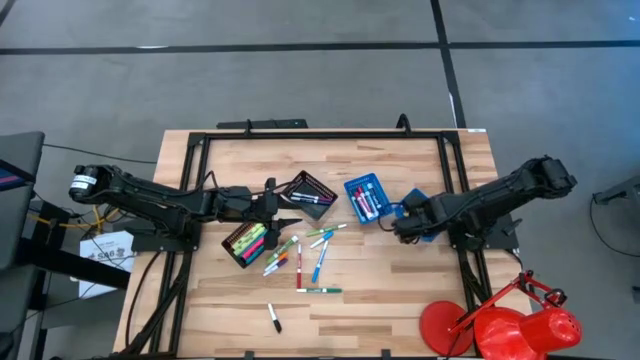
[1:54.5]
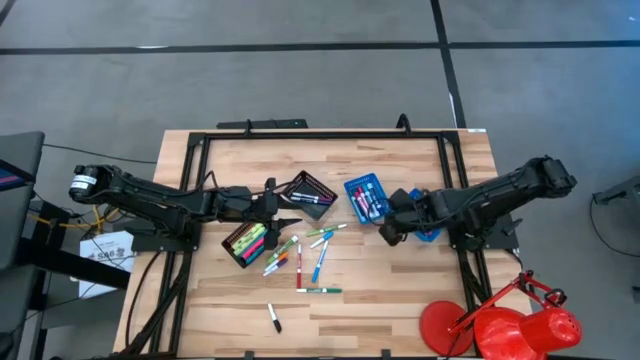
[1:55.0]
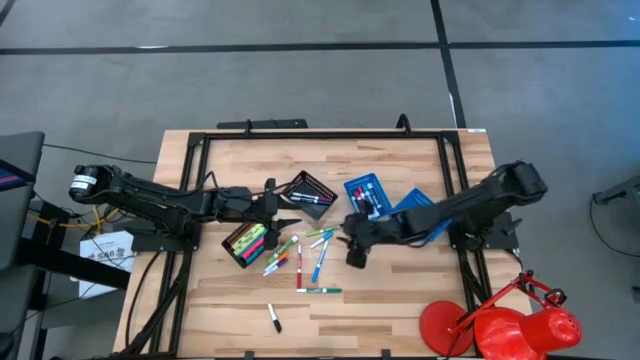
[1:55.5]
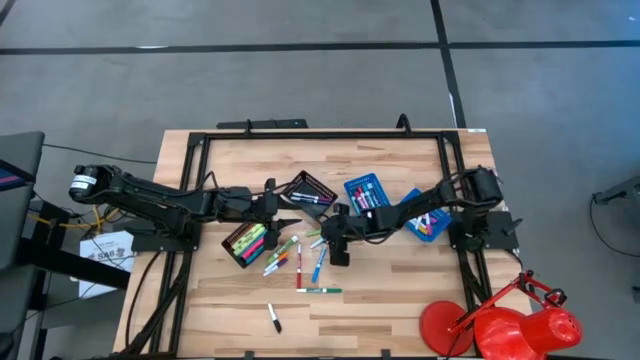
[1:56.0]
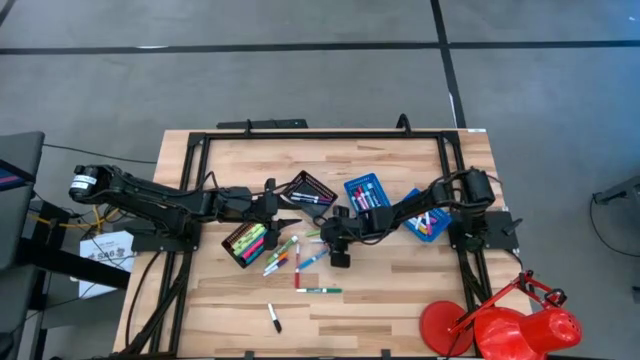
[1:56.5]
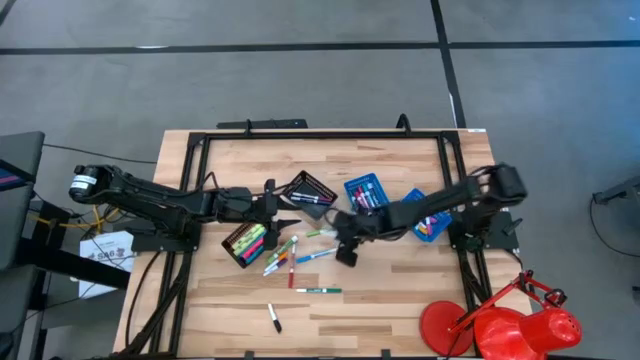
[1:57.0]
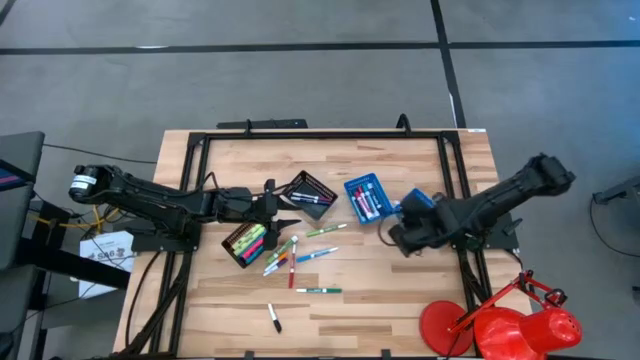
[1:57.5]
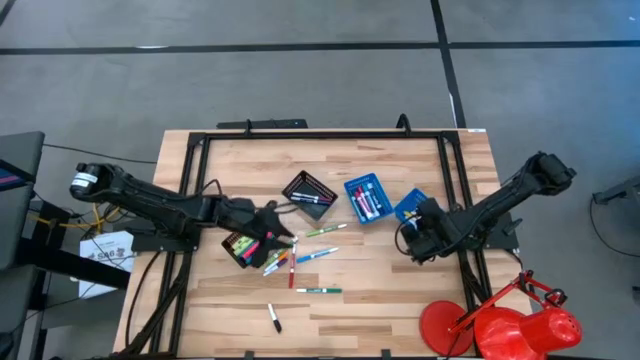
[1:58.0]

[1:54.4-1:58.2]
Task: Pick & Place Markers
Put the blue highlighter into the right blue bin

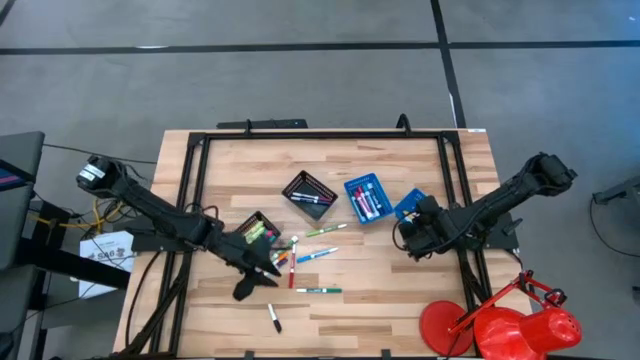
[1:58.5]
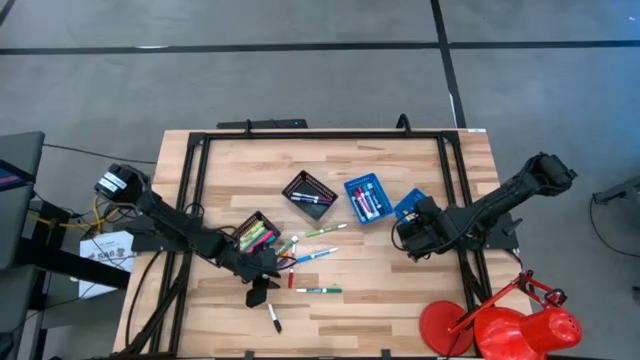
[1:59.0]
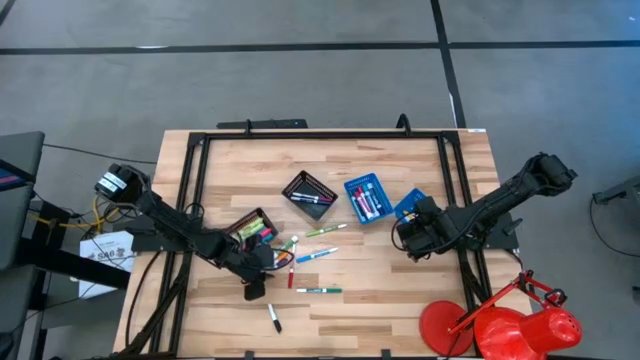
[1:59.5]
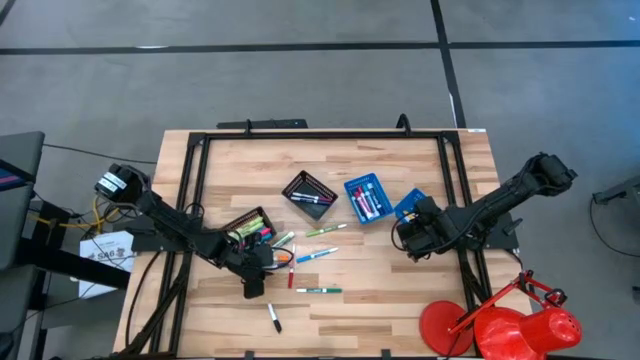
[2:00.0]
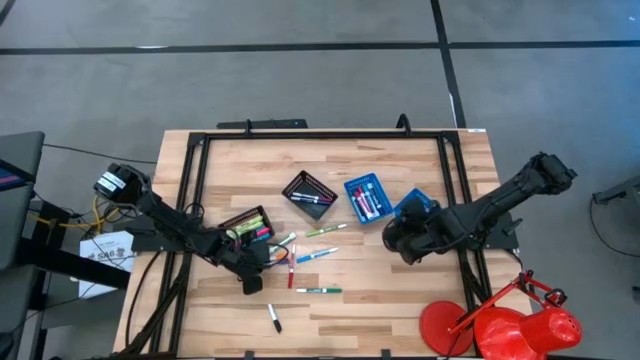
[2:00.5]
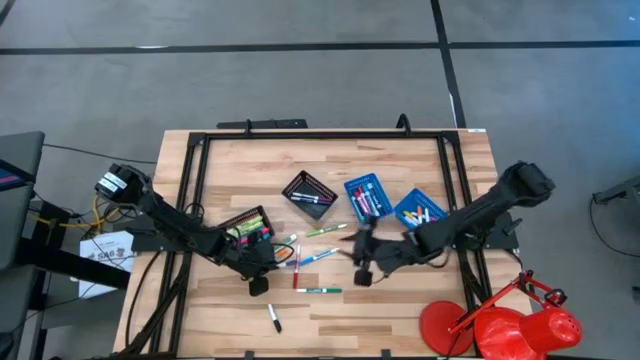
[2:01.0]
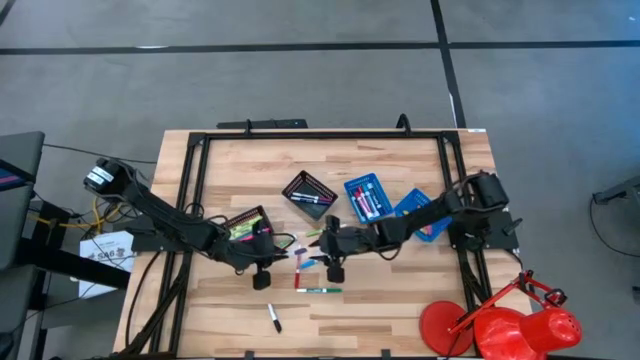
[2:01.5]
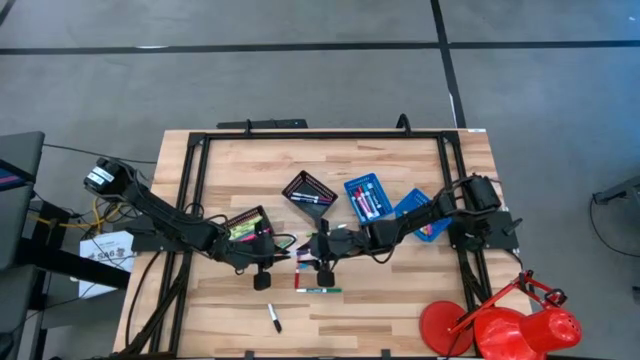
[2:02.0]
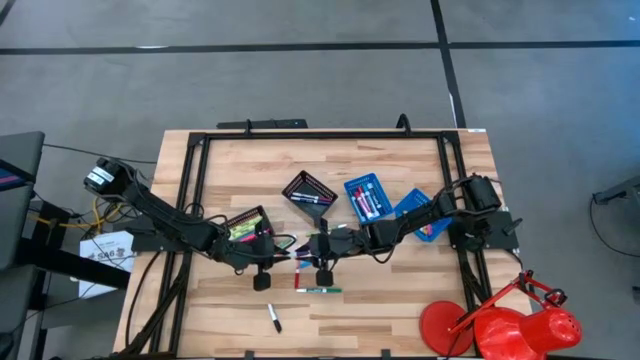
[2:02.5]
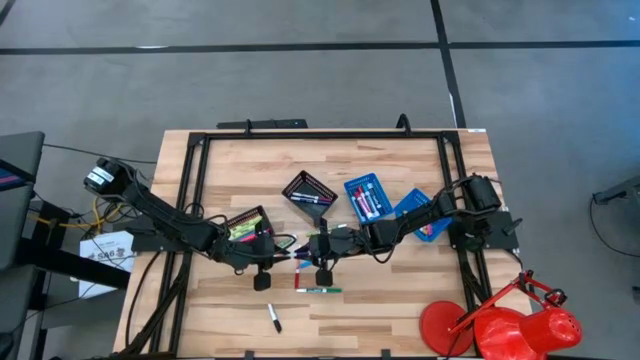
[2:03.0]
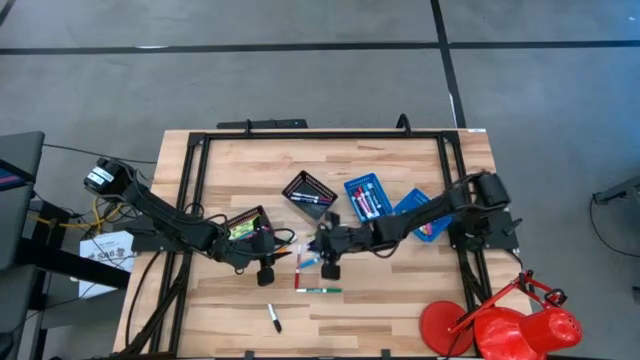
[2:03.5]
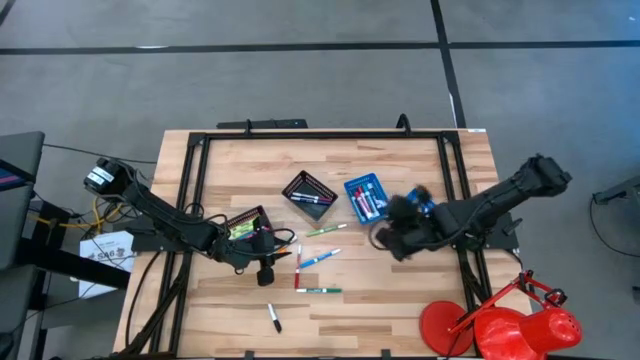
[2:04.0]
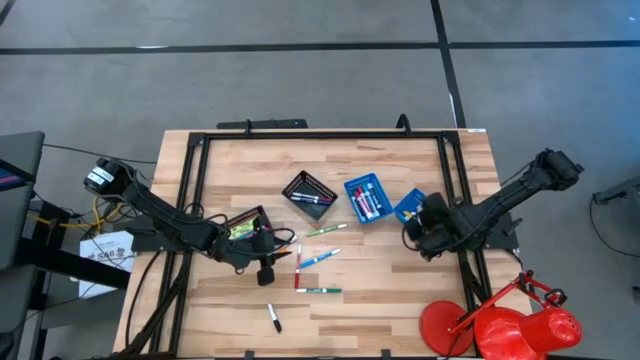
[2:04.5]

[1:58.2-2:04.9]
Put the purple highlighter into the right blue bin

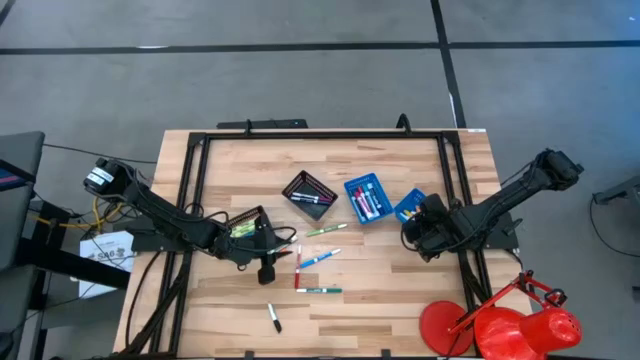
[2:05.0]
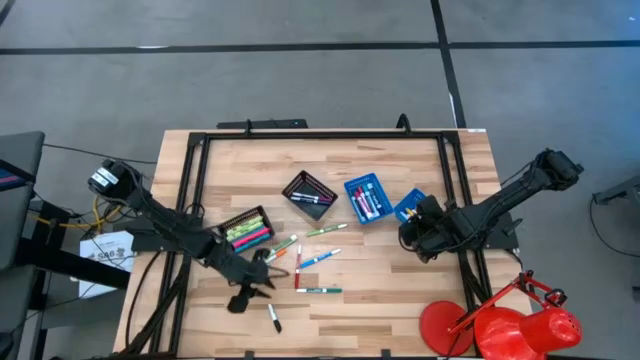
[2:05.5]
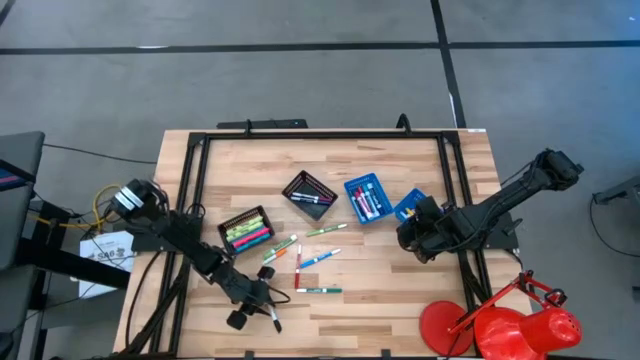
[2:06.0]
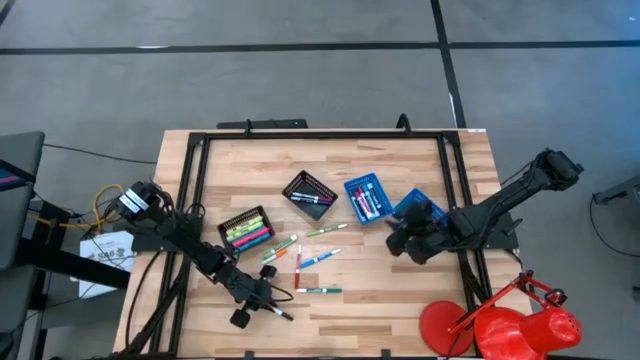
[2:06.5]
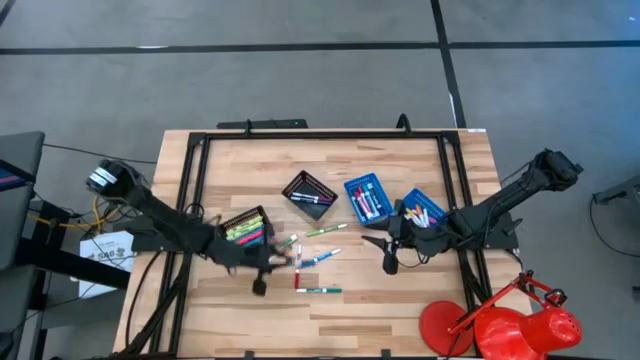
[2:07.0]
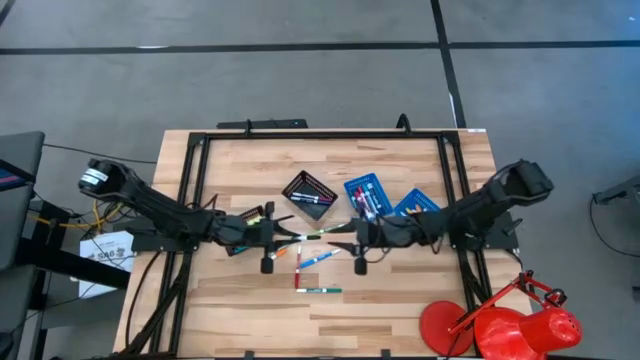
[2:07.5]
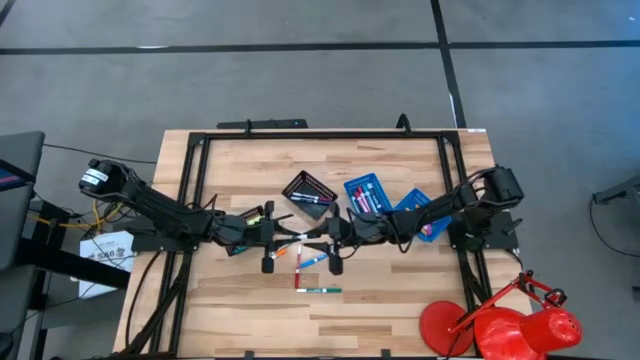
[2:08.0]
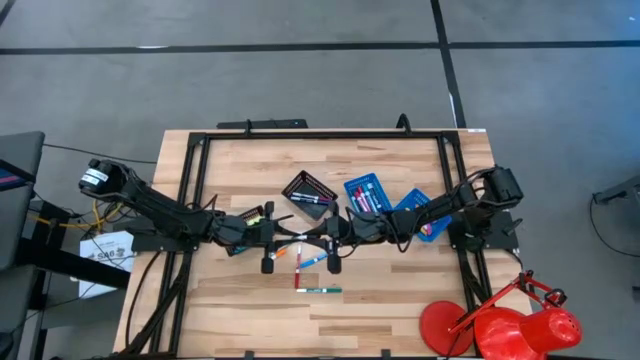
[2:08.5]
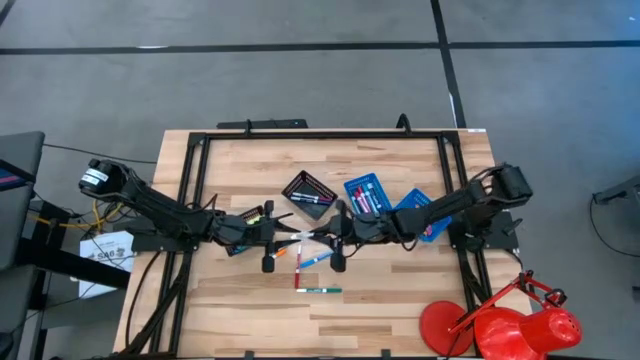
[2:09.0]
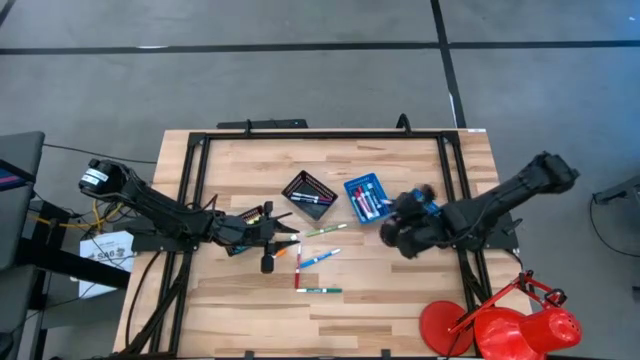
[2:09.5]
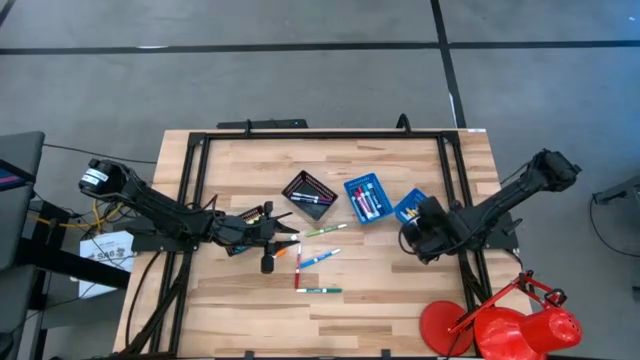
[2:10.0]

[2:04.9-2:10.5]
Put the black highlighter into the right blue bin

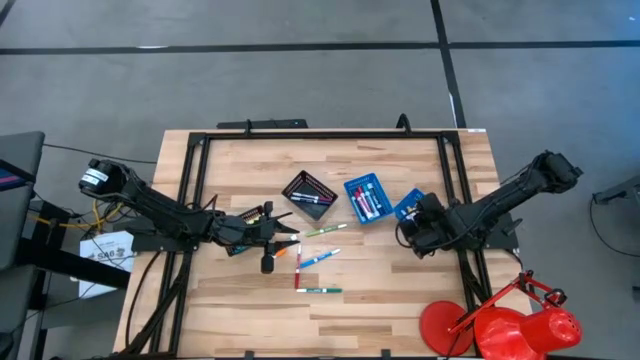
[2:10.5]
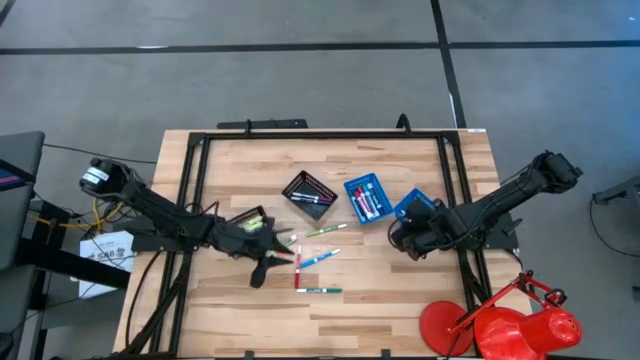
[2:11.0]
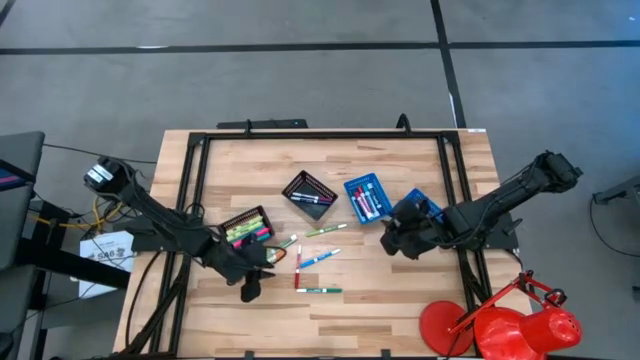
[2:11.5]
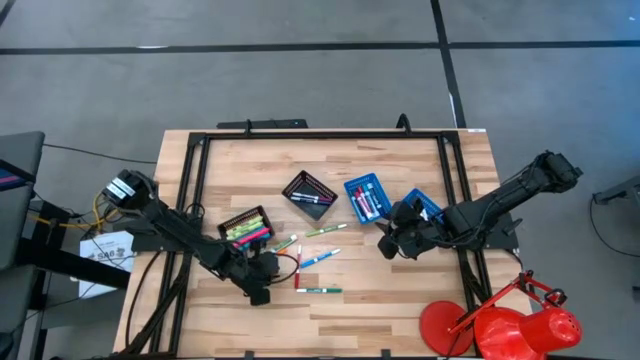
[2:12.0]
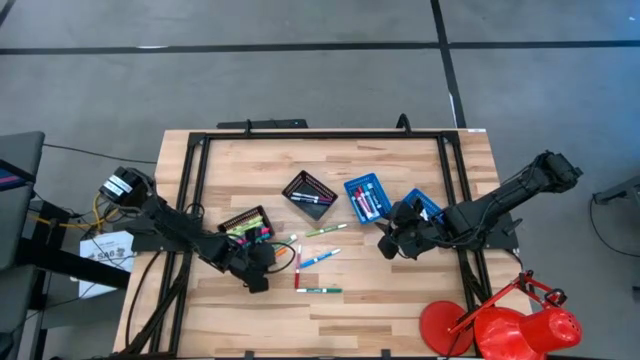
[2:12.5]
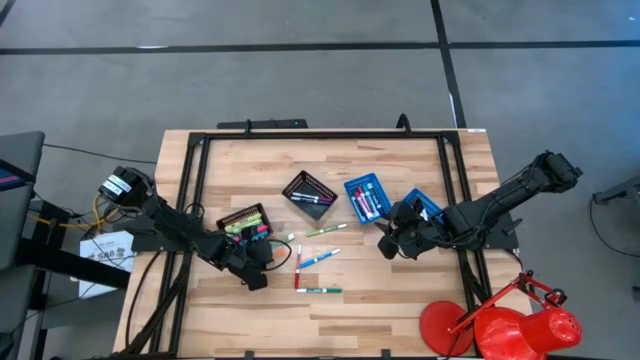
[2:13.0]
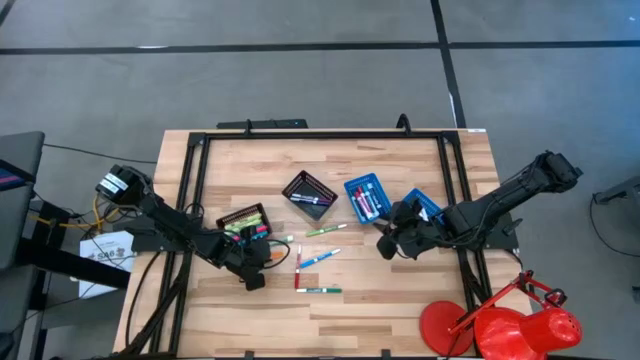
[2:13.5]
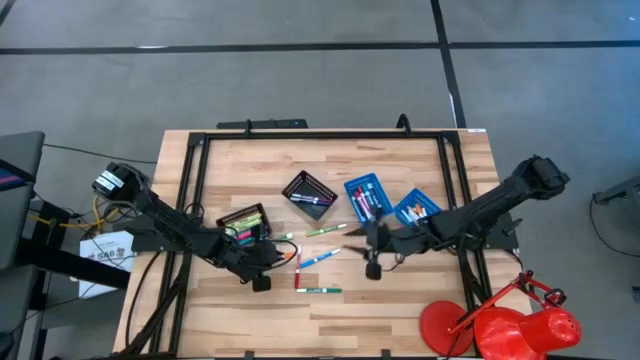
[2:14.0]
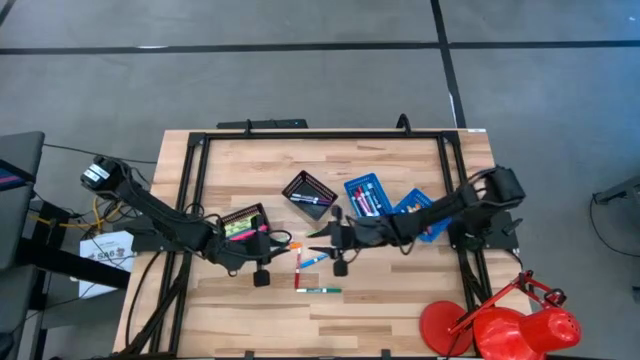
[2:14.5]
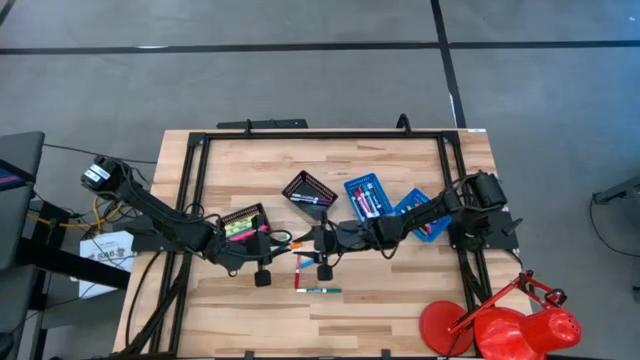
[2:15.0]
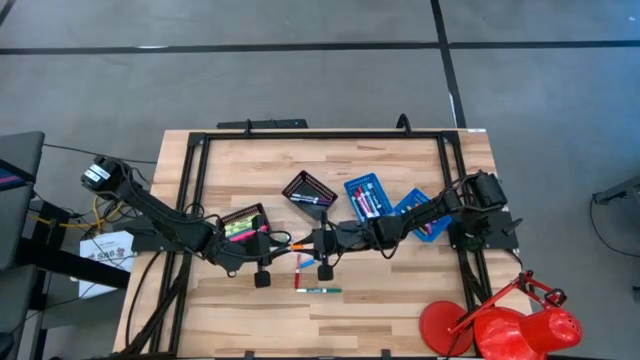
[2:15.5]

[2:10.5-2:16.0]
Put the orange highlighter into the right blue bin
